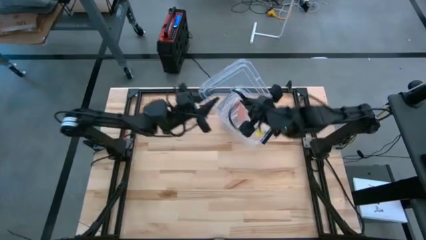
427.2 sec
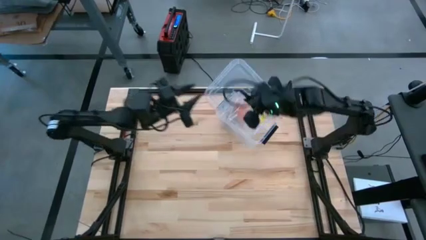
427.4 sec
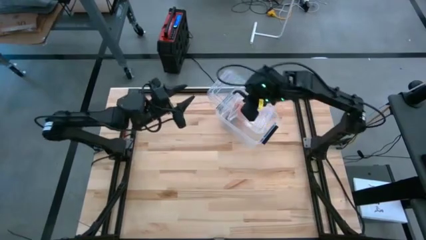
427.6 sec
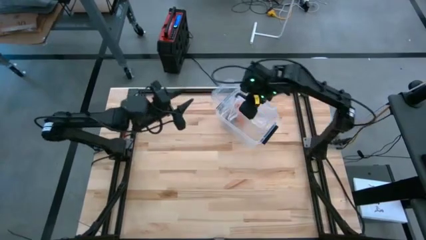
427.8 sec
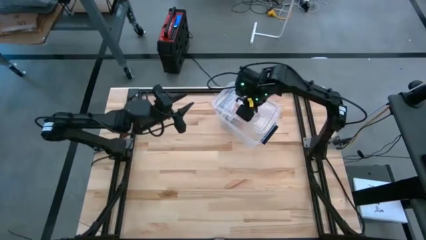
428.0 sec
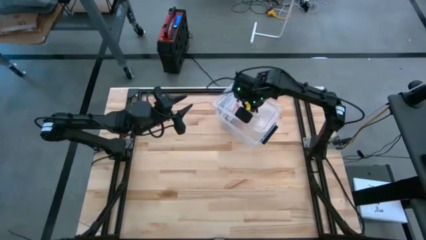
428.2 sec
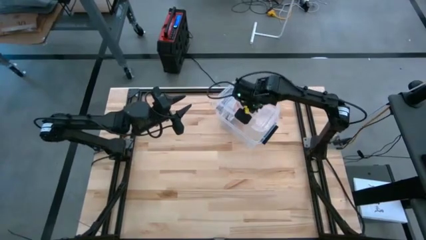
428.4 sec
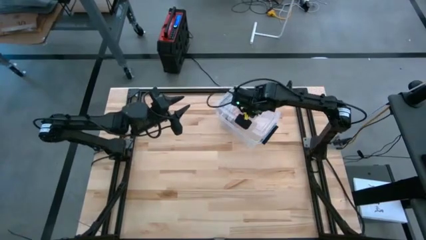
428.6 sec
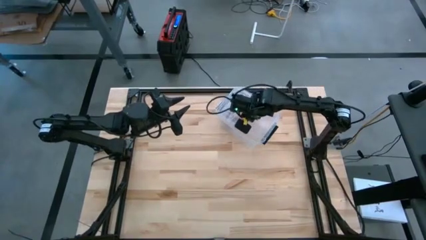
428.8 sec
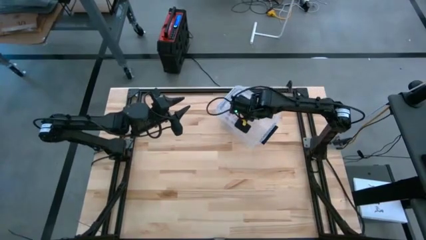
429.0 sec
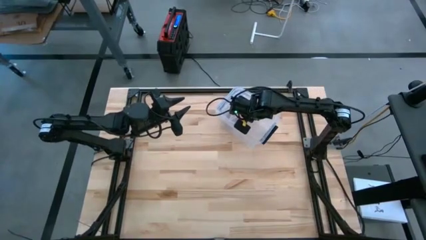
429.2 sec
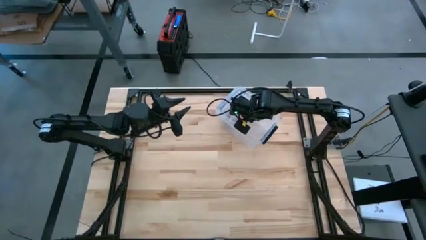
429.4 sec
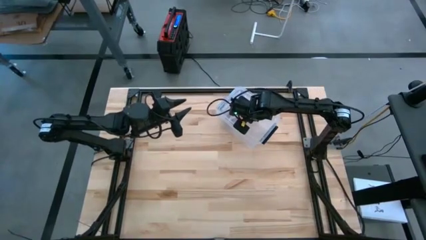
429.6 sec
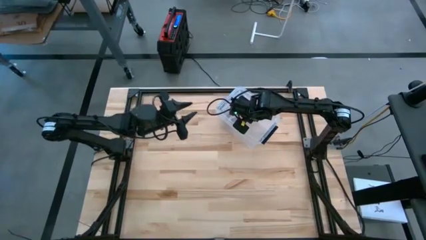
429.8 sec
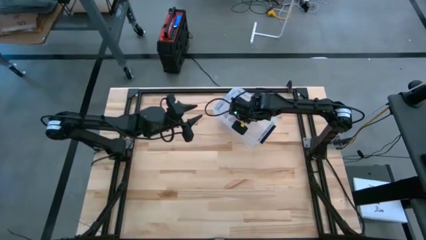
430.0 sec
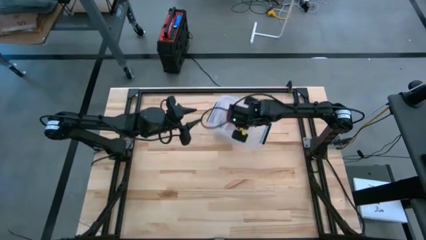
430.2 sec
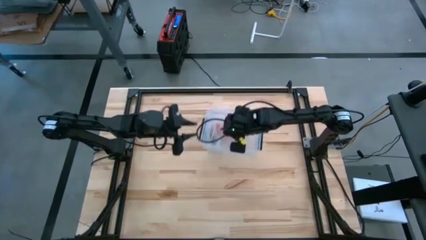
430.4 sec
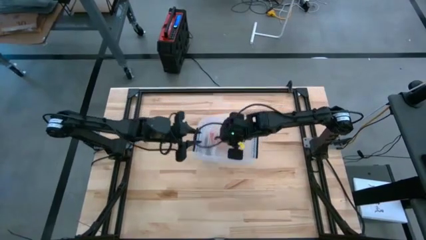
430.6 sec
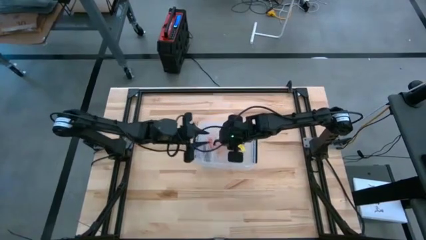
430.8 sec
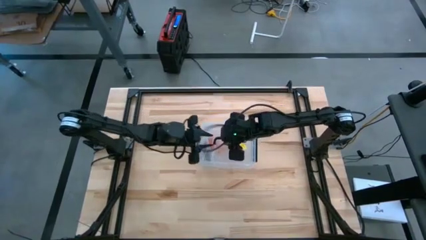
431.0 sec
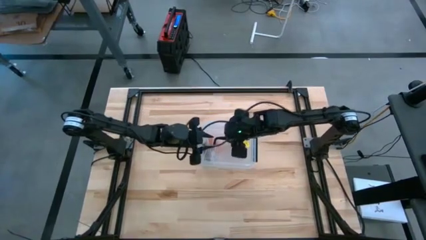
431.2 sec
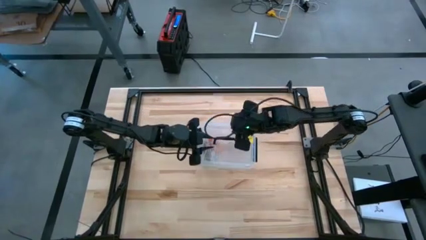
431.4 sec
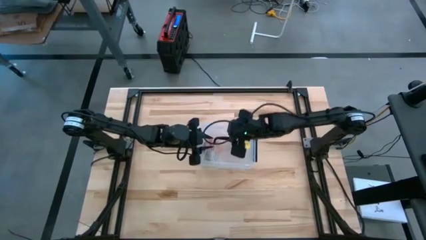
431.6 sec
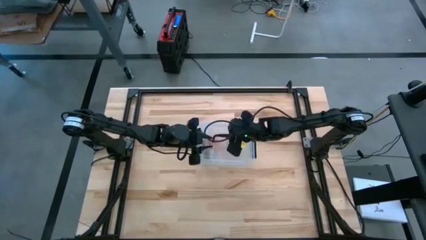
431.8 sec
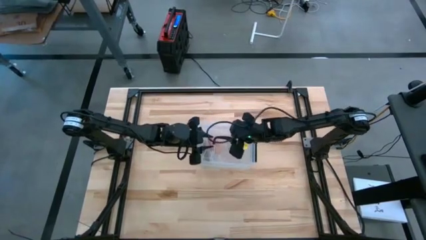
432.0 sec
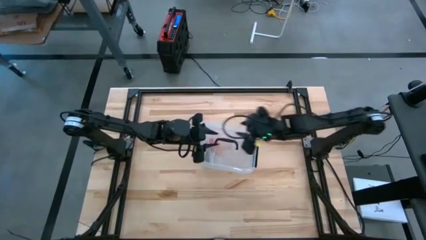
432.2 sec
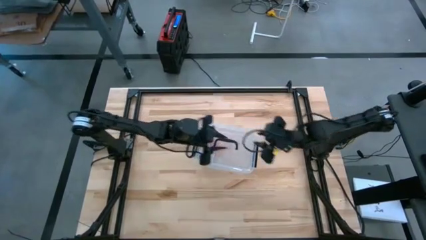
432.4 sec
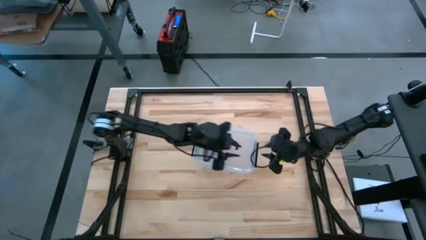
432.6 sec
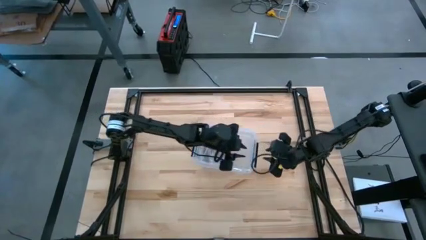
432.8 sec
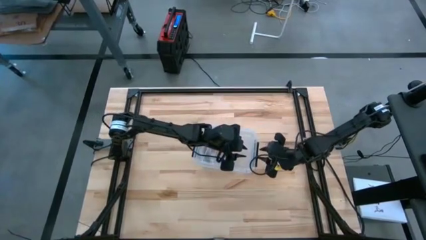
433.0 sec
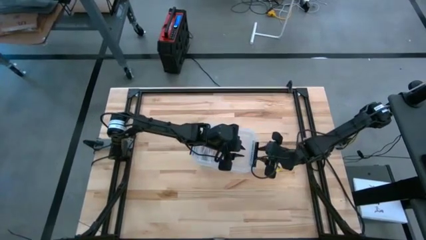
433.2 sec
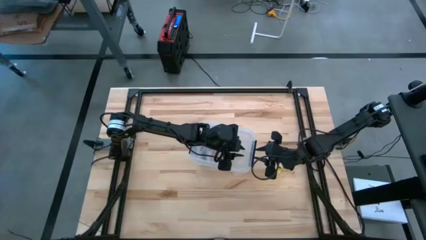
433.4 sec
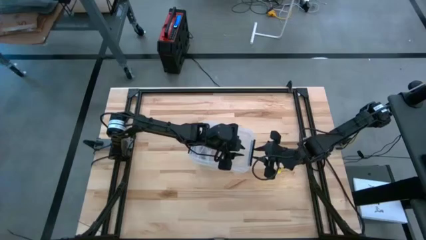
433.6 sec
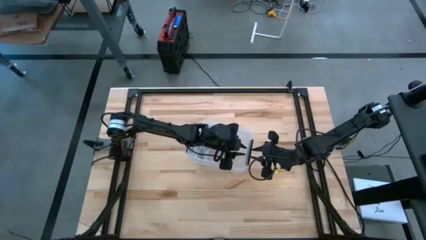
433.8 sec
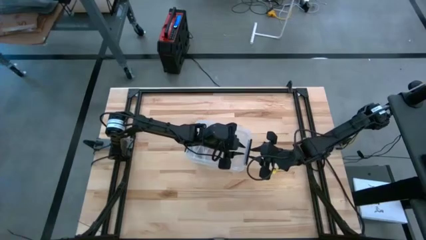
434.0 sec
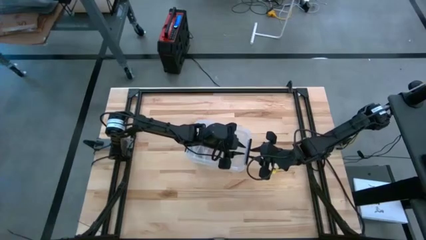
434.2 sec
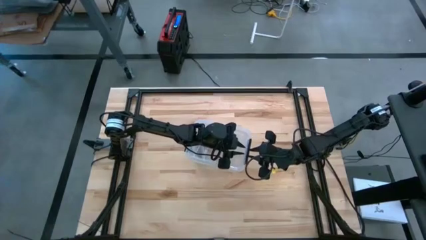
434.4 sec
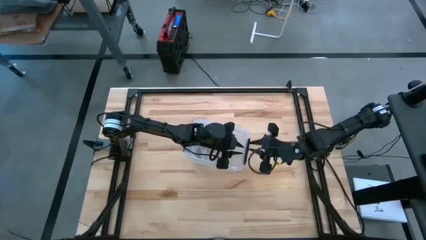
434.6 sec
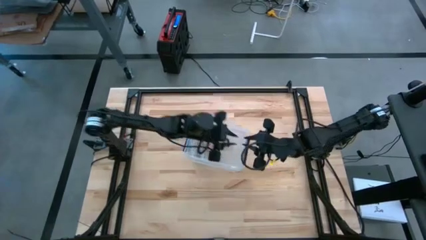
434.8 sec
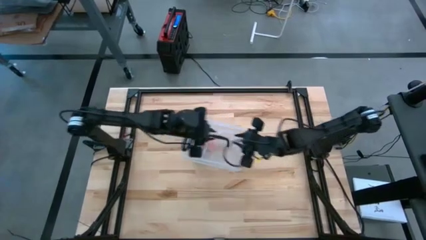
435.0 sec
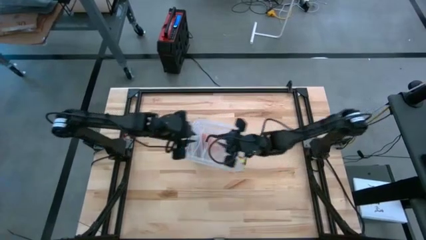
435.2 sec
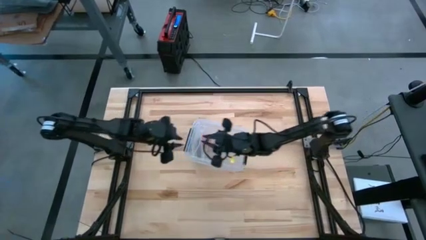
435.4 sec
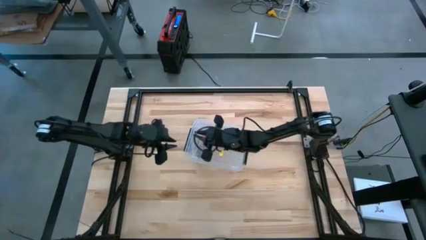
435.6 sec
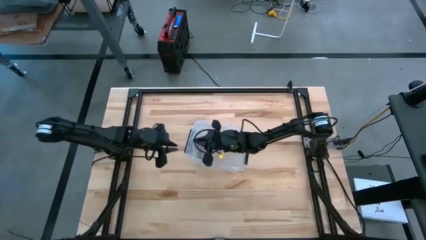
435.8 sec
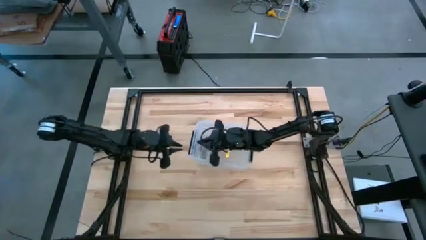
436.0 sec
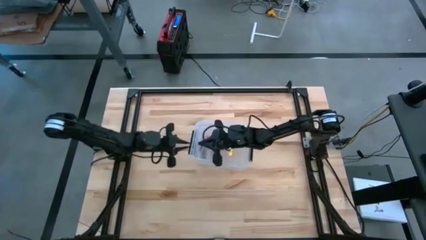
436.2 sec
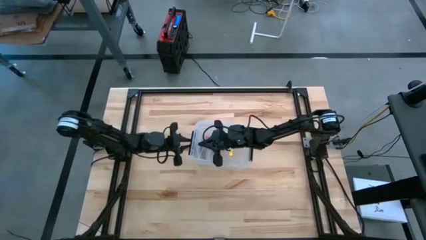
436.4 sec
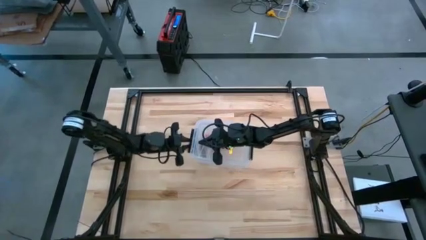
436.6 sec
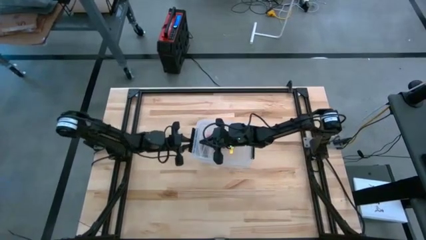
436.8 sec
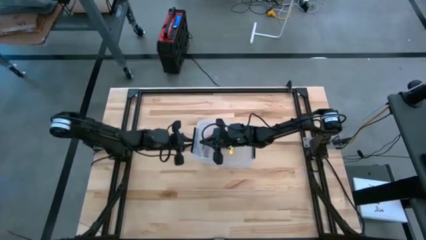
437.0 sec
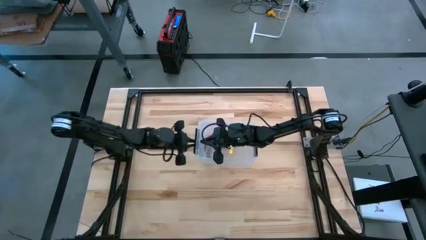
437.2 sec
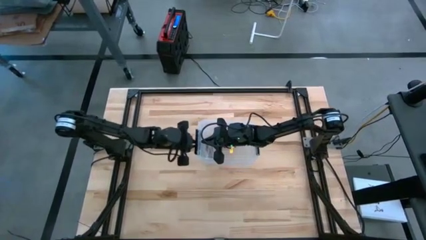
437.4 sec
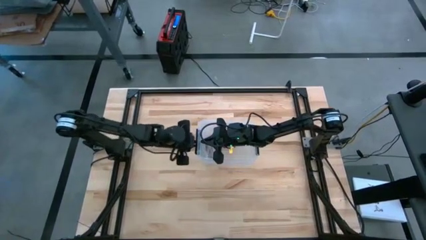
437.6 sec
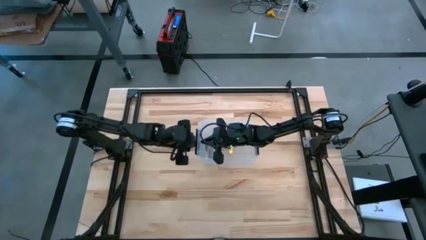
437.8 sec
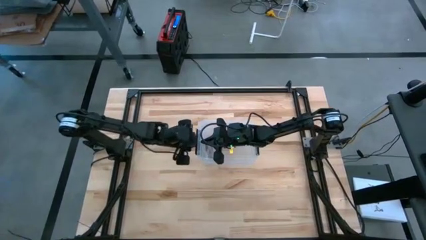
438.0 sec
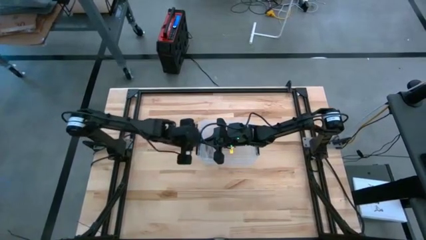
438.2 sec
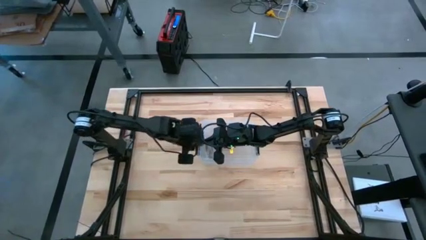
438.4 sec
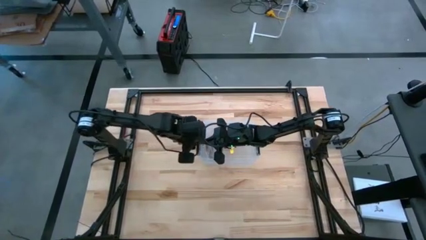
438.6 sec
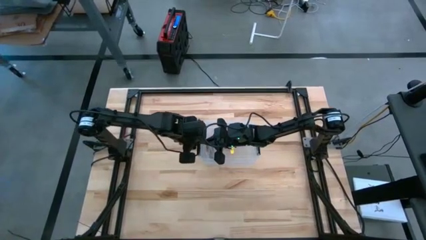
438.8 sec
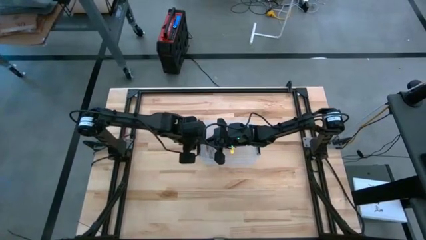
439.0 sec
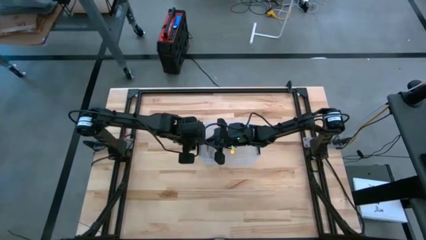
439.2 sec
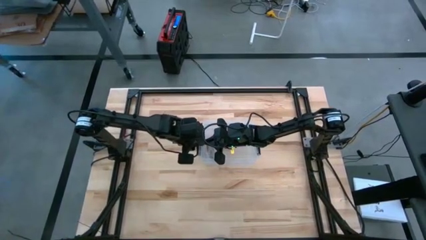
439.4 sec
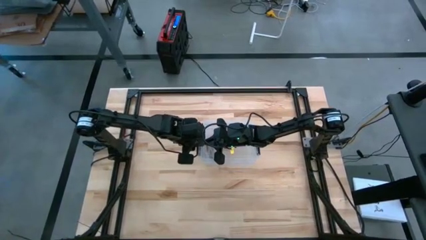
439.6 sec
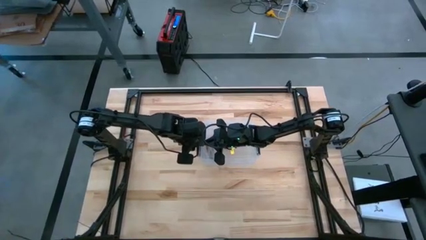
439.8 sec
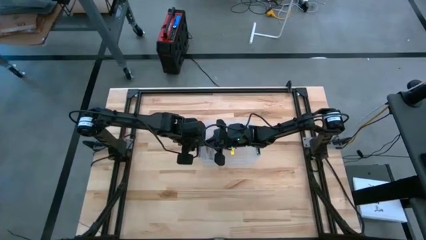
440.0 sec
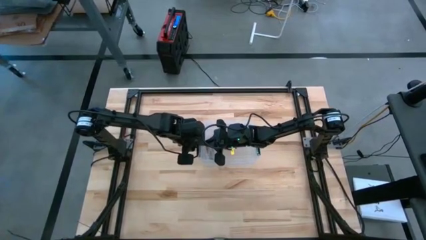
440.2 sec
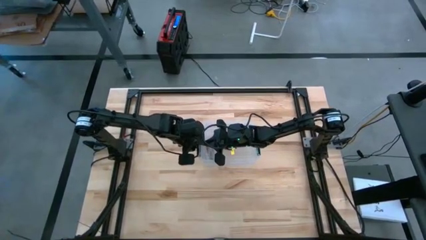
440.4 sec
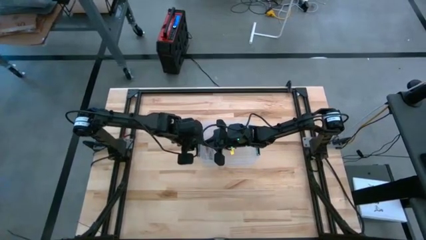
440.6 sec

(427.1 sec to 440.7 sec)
Task: Roll bandage
Close the transparent bin on the table

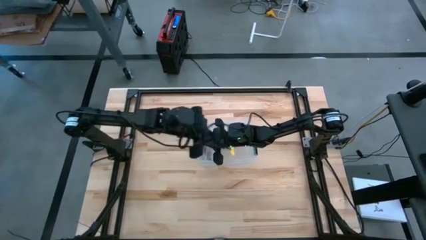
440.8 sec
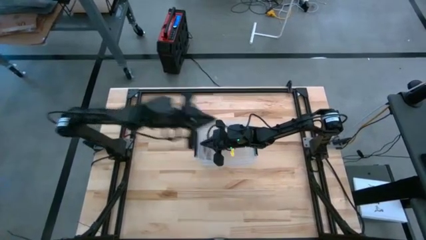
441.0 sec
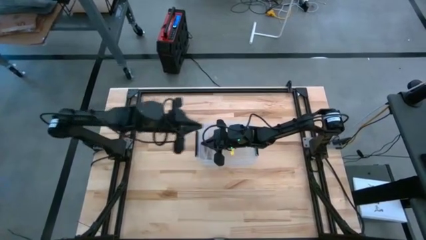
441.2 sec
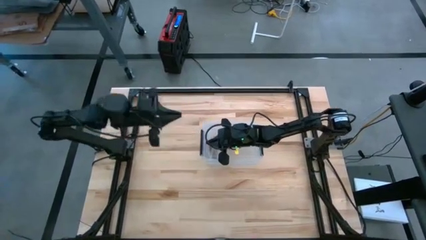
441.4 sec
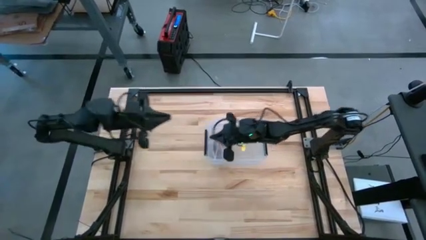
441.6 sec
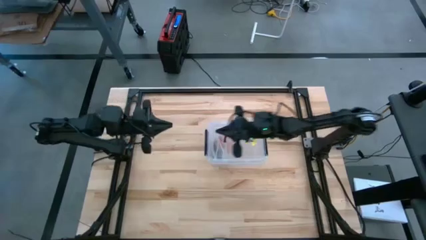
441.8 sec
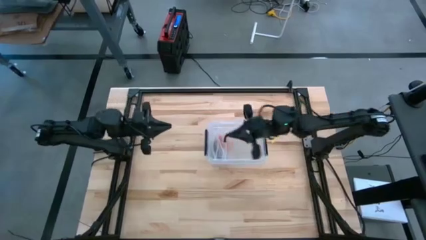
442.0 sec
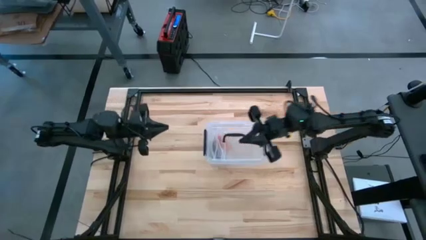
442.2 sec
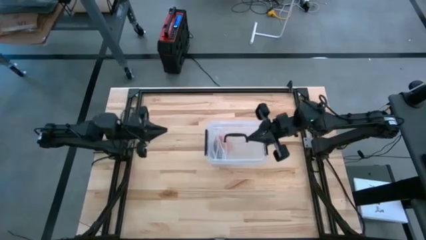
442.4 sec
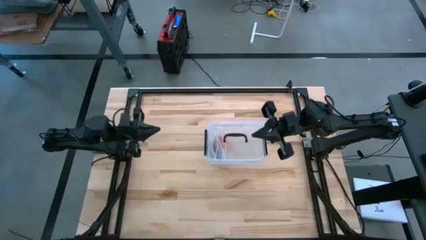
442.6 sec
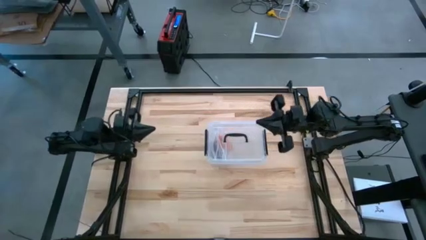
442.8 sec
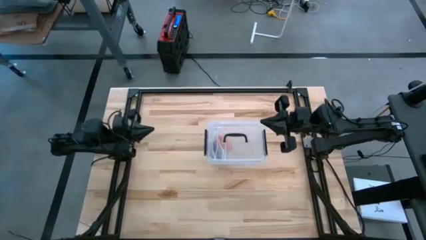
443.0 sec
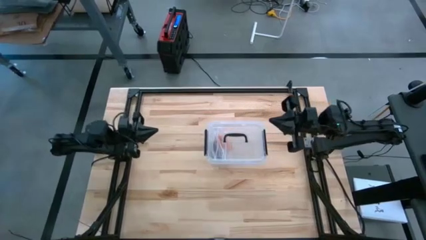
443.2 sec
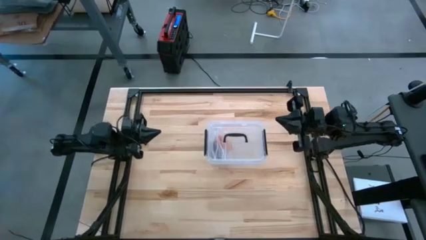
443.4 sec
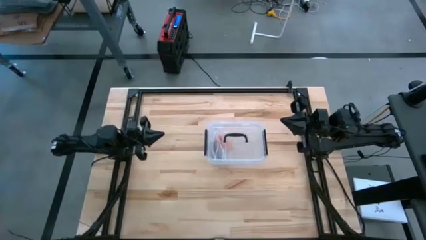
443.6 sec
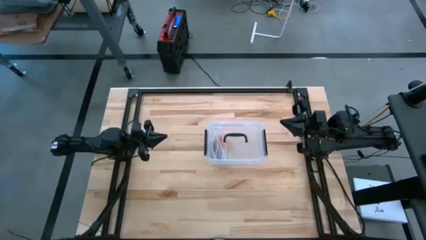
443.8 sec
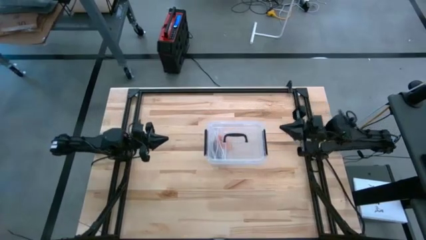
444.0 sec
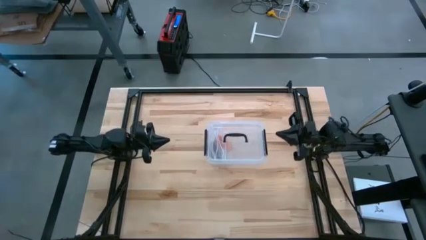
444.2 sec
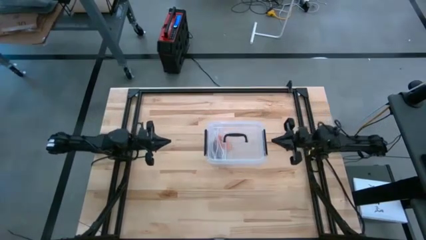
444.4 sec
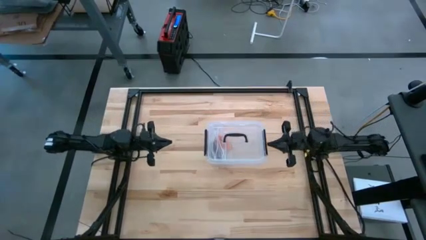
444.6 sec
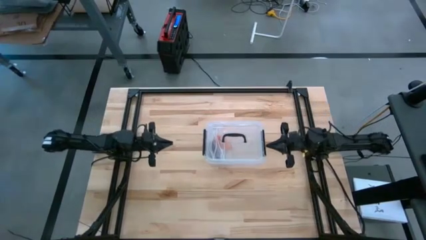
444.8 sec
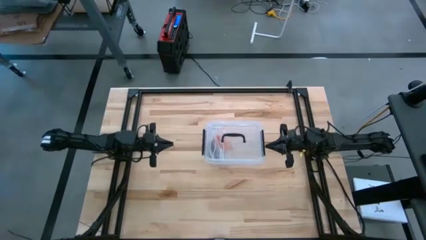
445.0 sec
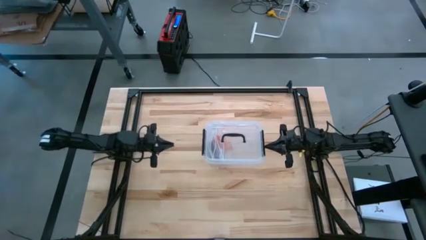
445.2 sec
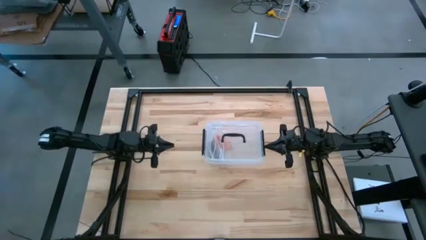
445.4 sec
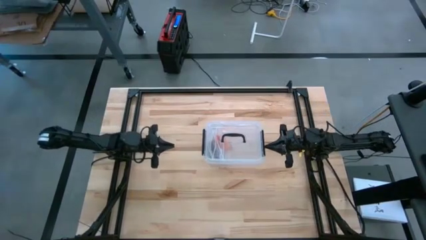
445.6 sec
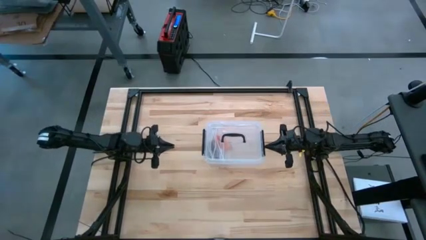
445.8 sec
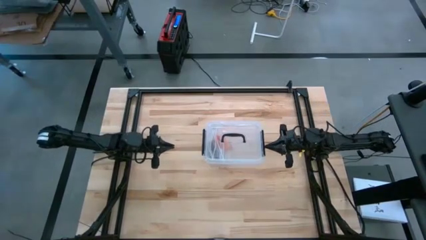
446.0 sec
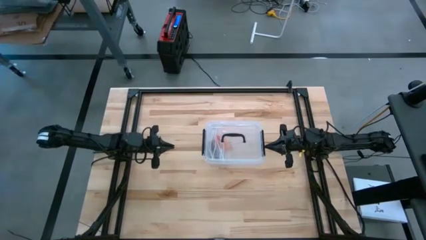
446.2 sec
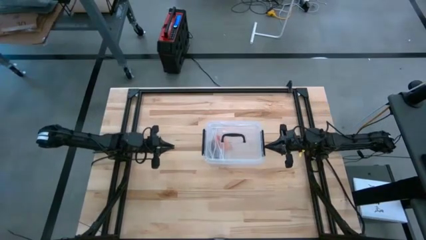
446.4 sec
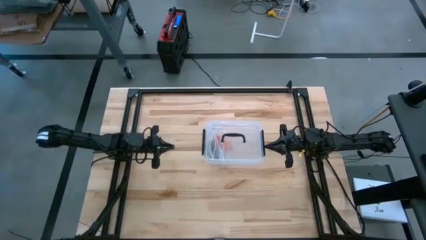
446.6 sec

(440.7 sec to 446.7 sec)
Return to Home Position
